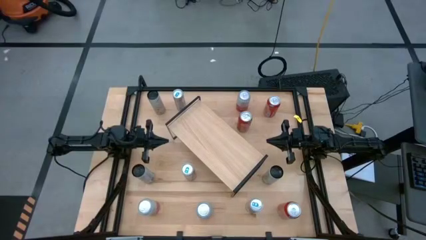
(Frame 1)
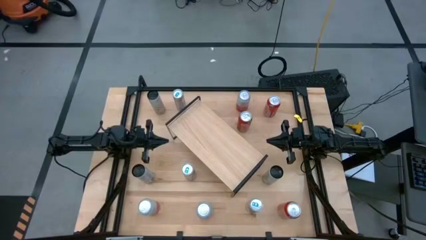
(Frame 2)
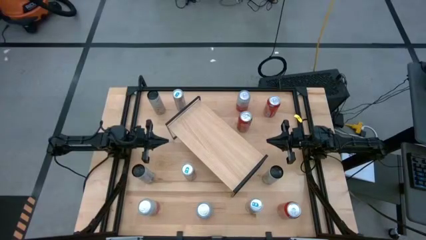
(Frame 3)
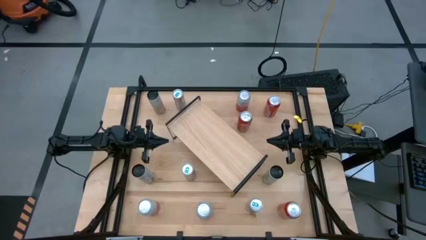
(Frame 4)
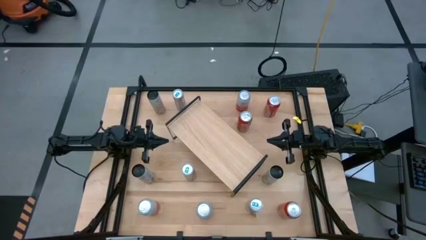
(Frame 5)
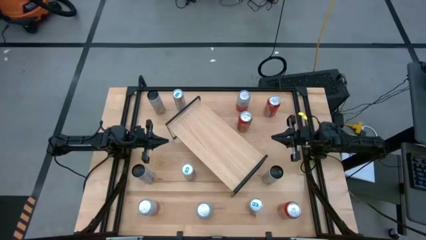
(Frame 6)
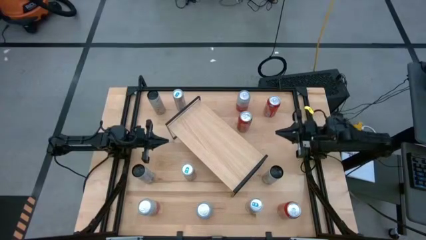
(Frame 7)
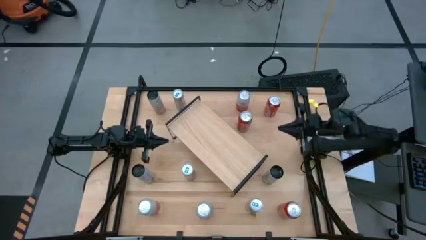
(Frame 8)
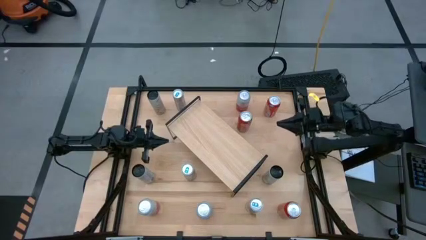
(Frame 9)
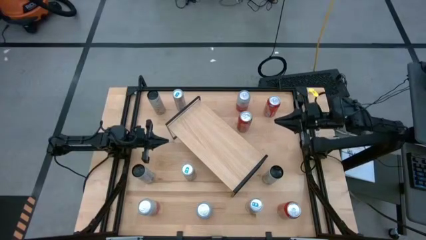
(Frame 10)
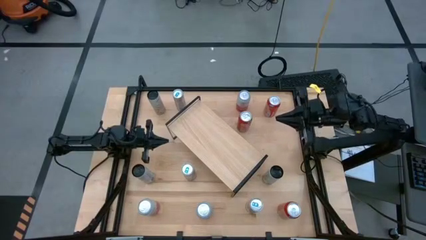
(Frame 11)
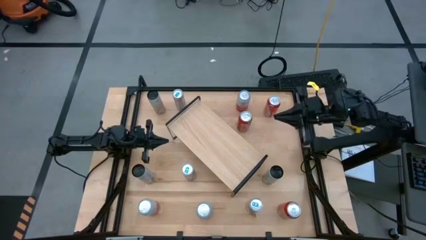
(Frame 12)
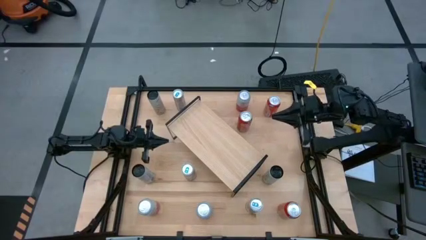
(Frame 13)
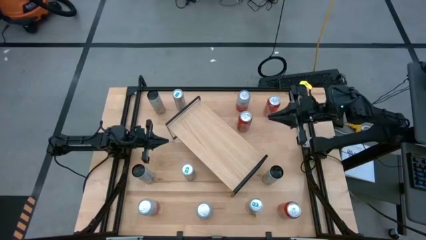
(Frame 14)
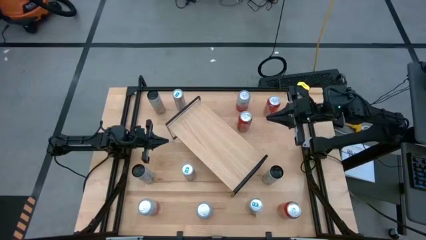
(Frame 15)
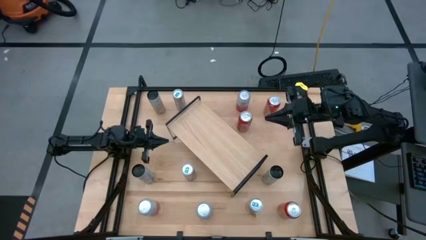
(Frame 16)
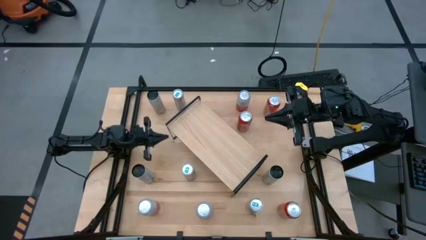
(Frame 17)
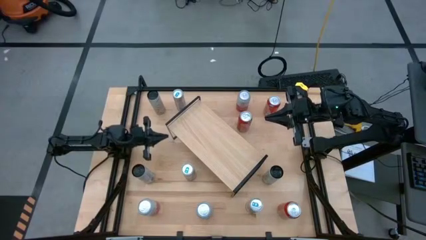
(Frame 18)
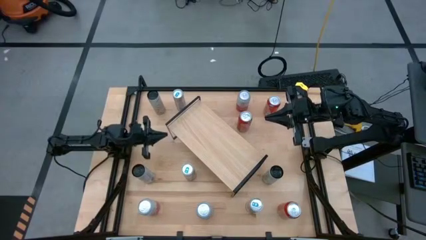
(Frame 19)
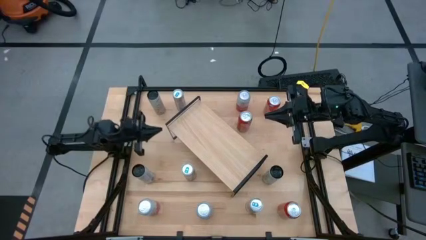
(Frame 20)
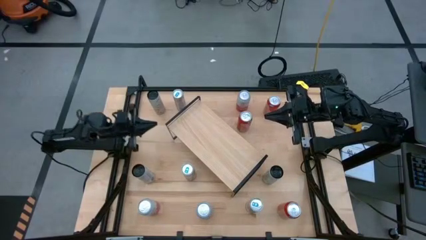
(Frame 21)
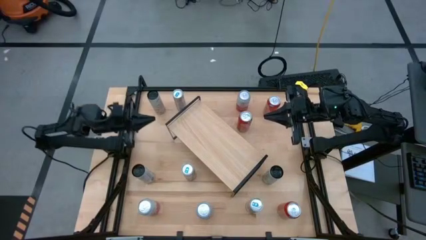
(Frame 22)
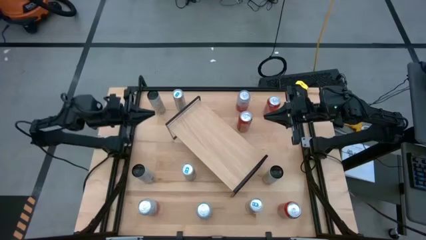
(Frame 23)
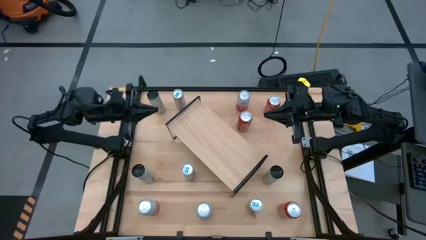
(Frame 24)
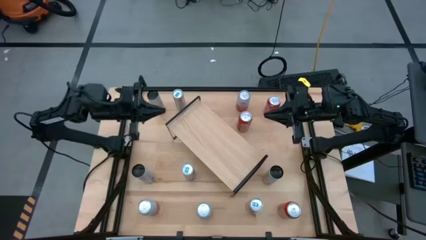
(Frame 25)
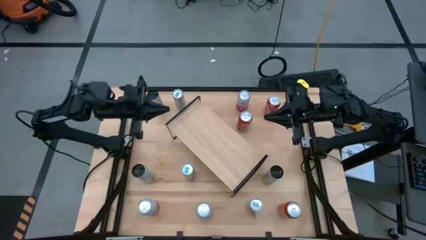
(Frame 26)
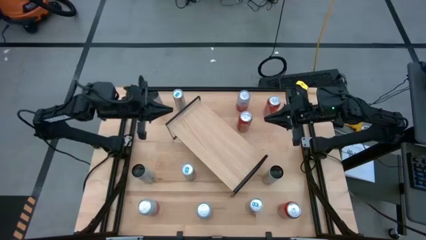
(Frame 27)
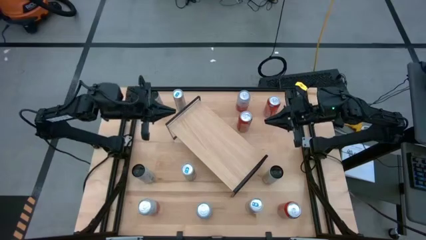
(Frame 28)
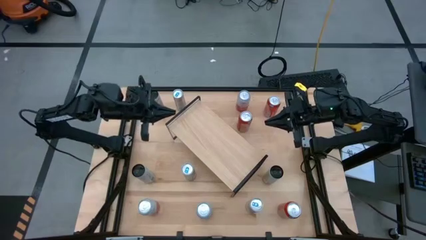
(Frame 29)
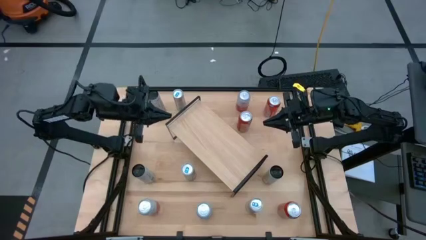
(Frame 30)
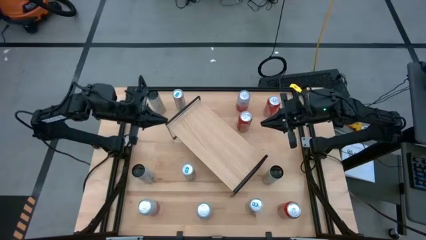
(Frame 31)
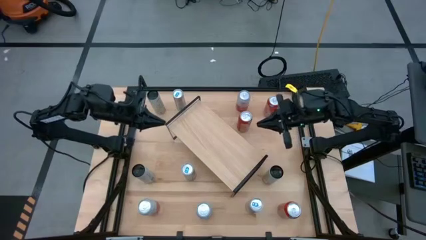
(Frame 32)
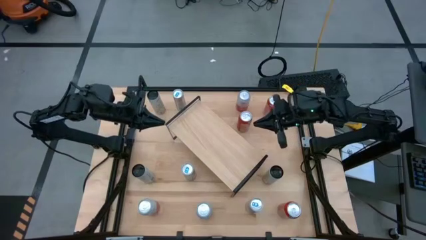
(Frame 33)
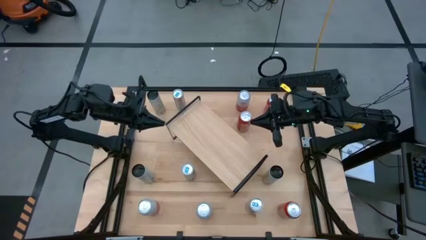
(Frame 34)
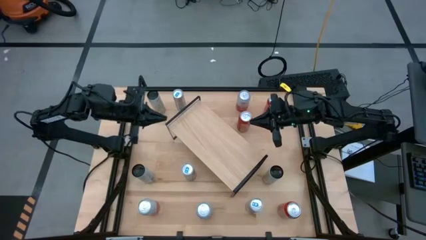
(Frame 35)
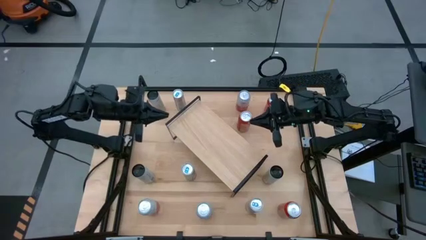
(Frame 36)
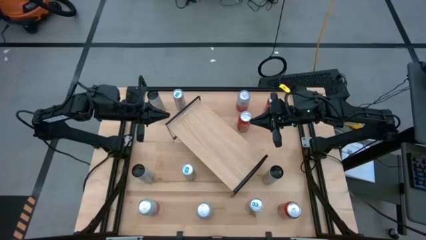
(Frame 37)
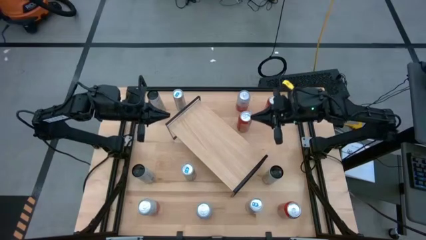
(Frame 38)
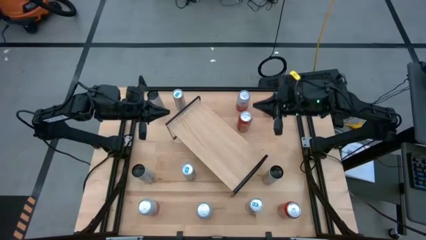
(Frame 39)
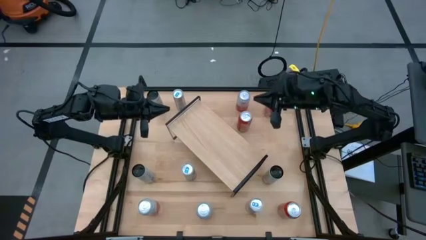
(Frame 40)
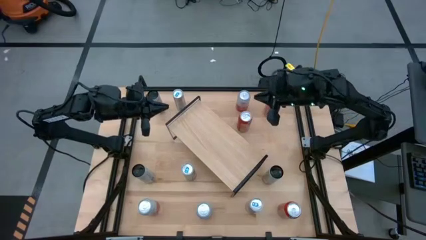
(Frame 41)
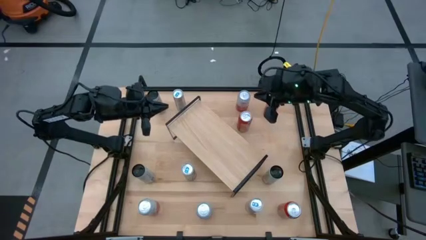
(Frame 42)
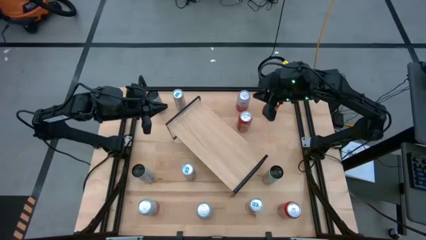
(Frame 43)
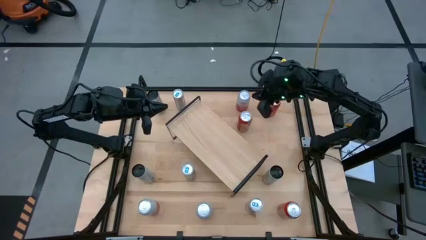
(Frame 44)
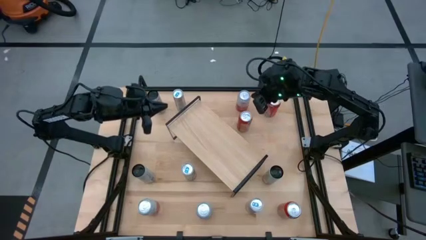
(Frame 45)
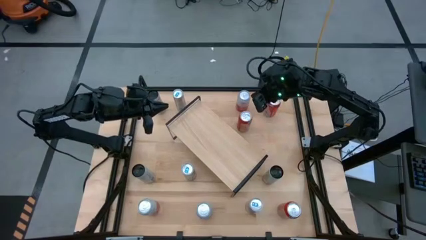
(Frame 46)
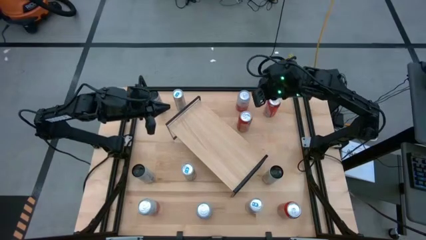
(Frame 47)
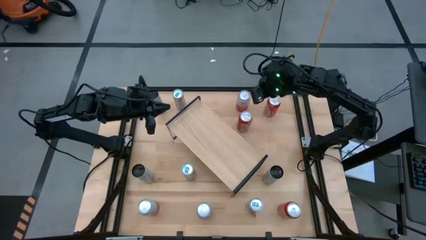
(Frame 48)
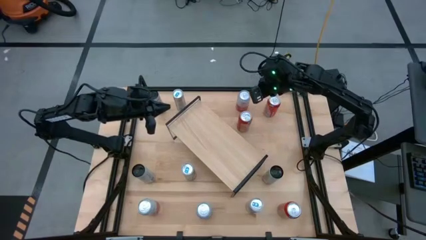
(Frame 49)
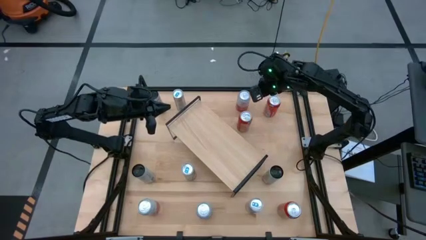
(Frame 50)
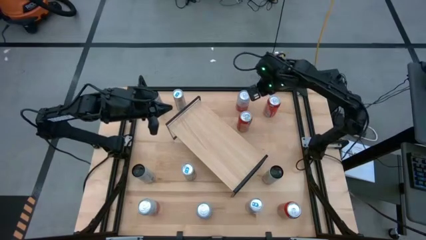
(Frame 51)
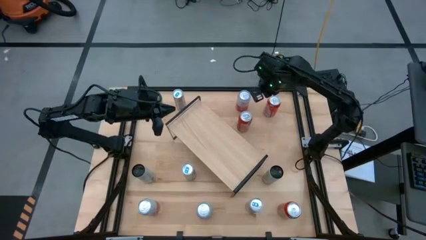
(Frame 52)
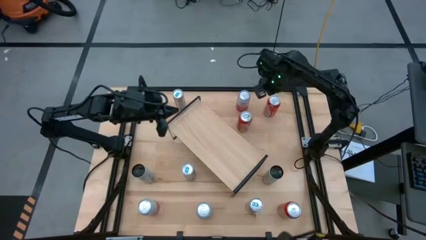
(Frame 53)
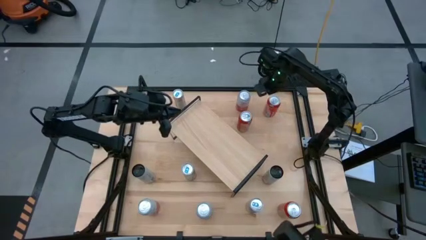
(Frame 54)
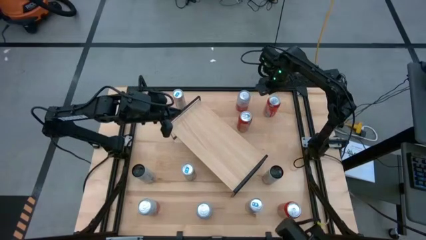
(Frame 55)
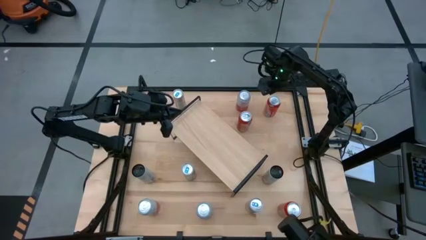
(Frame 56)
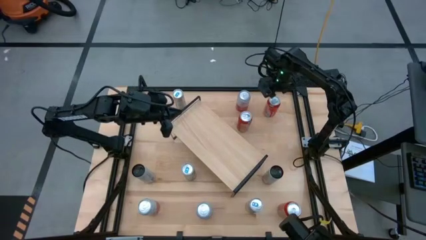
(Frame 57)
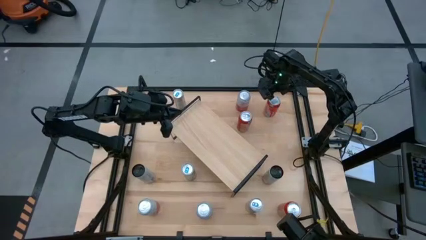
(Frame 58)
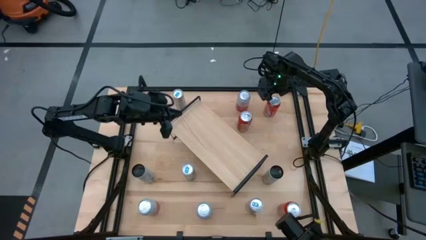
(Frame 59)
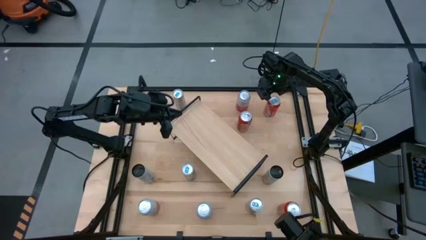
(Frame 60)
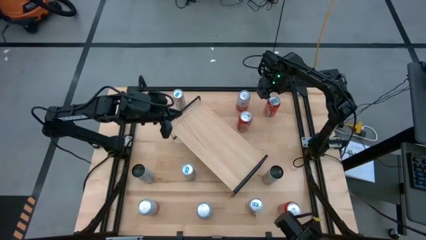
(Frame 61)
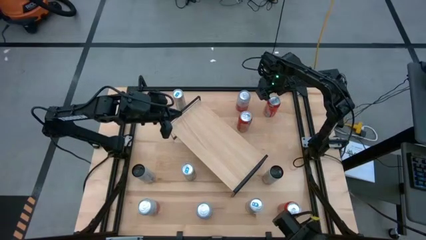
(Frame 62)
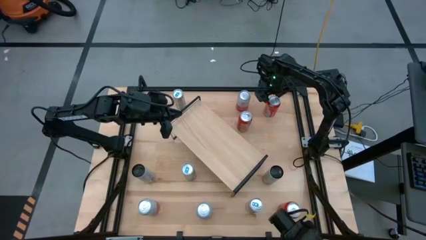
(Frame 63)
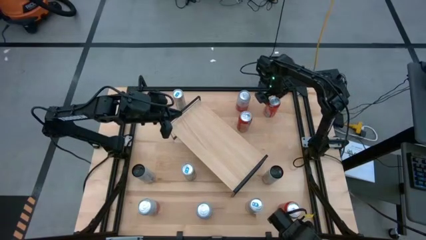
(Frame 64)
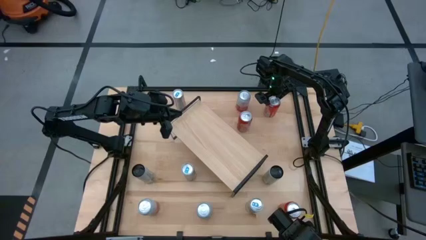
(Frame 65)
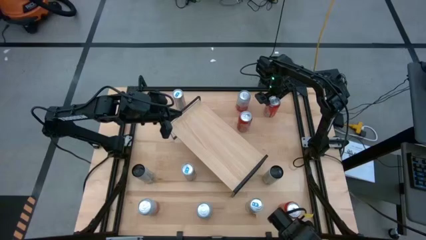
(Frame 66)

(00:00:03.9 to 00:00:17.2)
Task: Place canned beverage on shelf
Put the top red soda can on the shelf

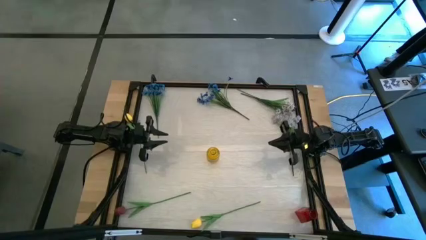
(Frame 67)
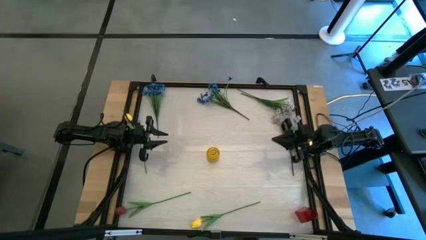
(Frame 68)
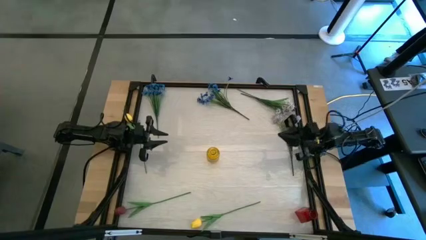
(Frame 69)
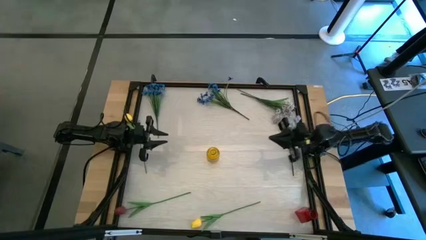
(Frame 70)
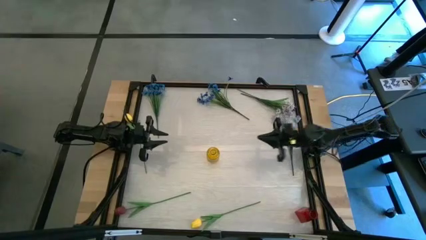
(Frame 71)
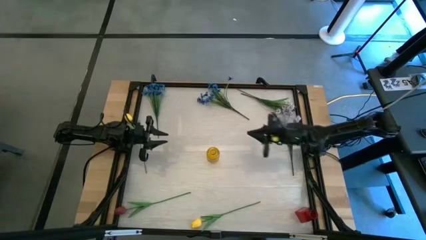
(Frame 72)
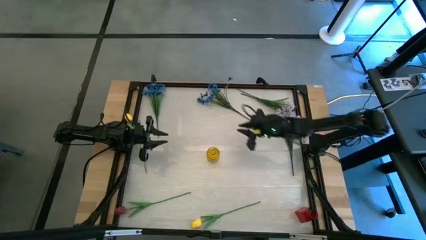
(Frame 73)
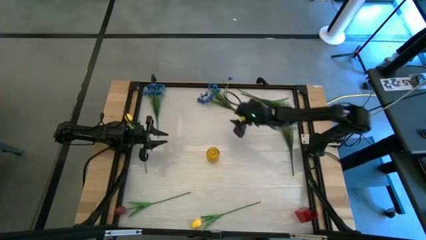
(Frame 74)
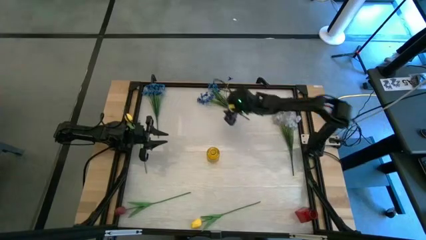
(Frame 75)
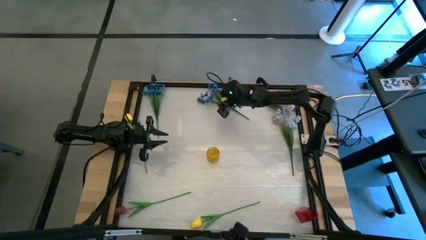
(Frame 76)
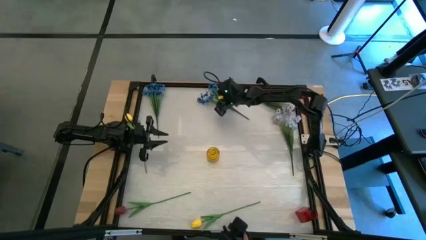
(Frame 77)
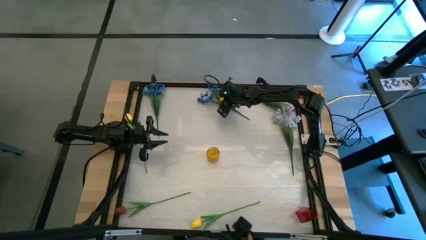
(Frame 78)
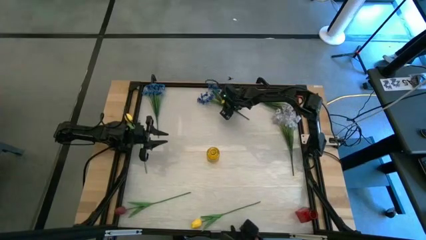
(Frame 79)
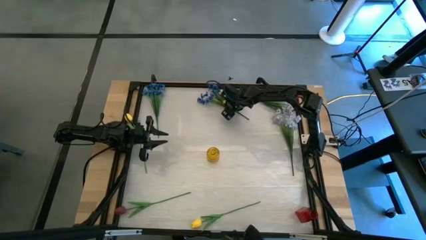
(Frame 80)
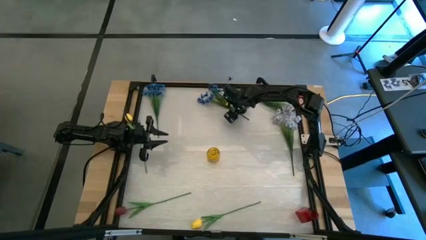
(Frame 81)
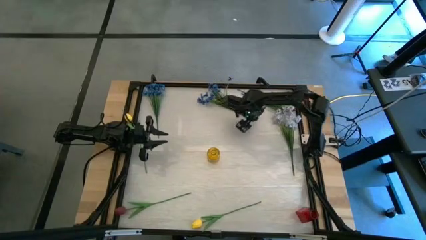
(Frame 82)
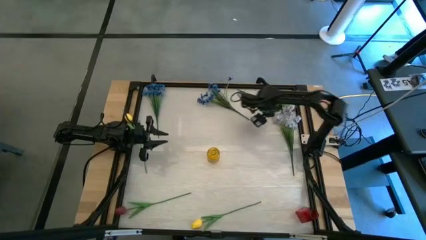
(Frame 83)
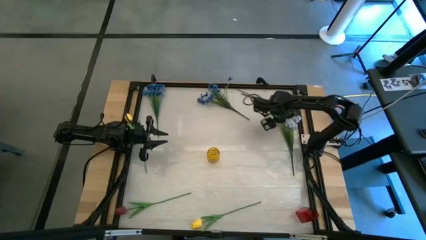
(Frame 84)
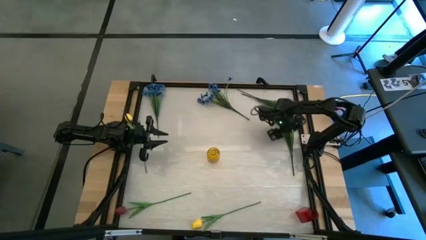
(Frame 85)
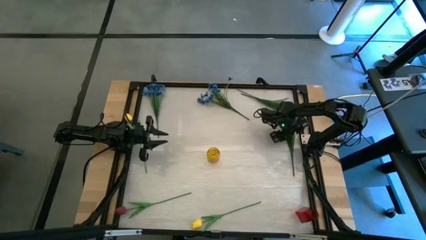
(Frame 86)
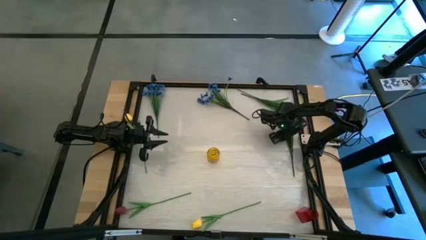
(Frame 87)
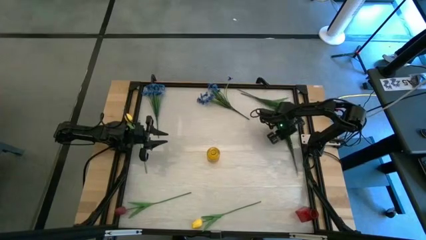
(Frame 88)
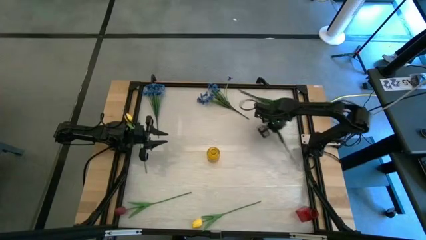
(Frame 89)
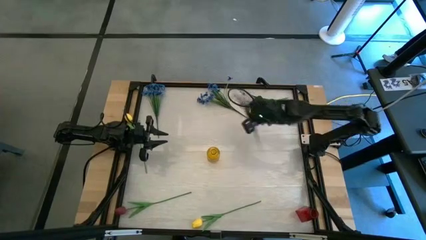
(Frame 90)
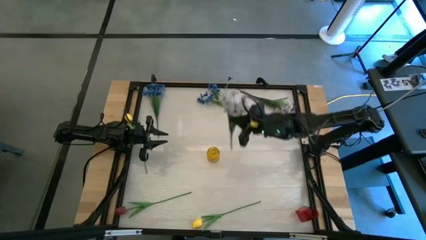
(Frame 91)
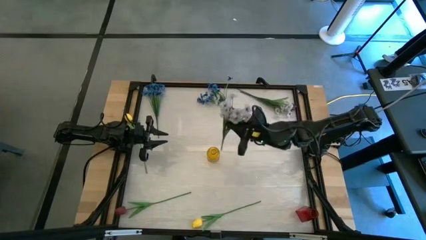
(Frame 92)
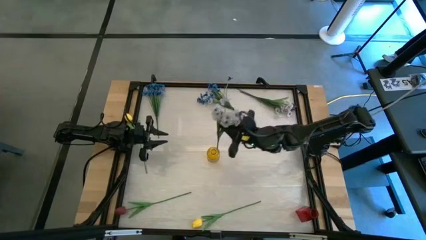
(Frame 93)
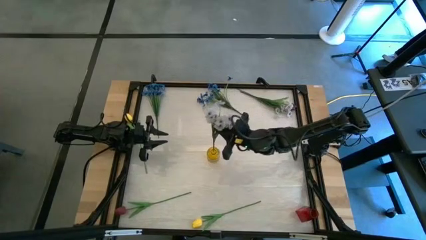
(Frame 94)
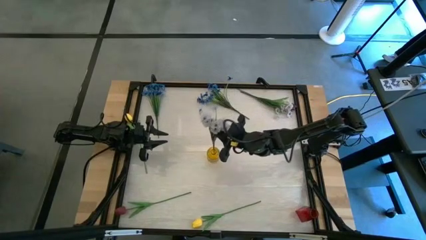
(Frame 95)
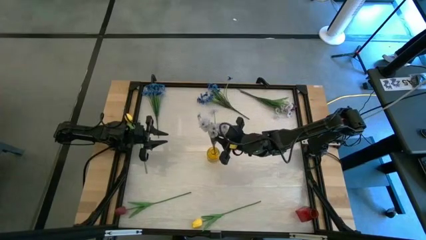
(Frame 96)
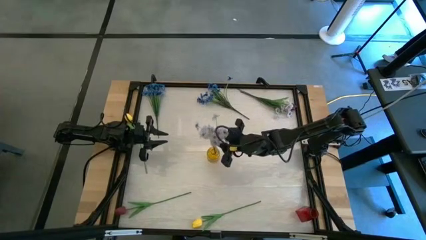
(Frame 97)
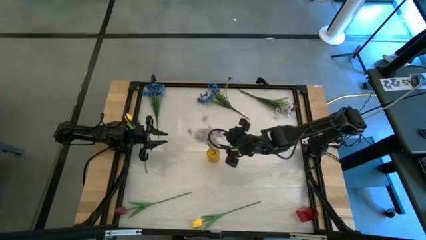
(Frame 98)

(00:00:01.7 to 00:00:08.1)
Task: Sort flowers into vase by color
Put the bottom white flower into the yellow vase
